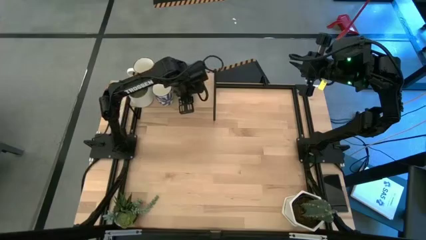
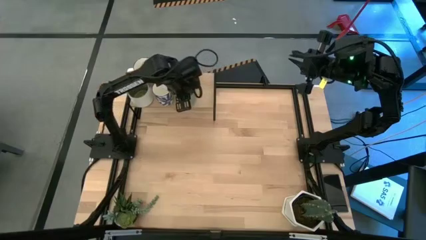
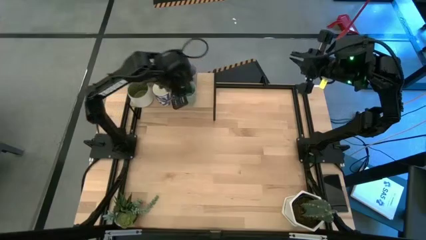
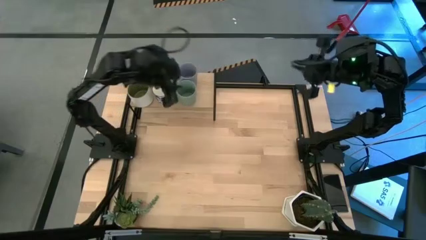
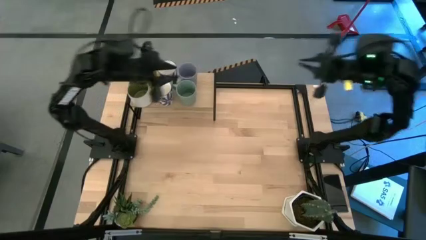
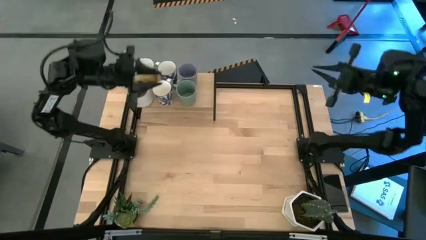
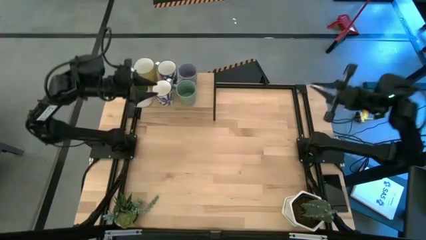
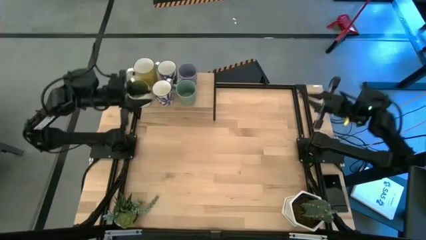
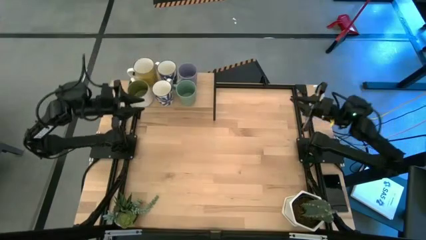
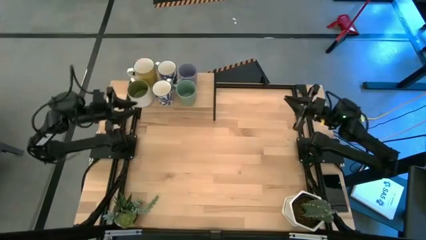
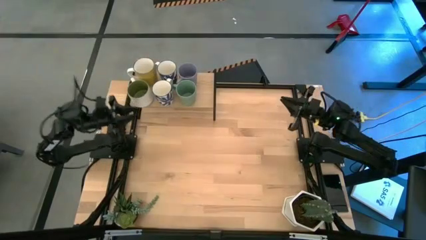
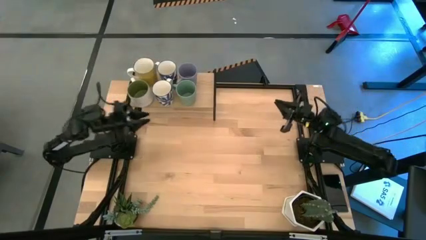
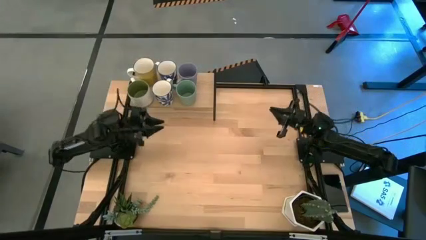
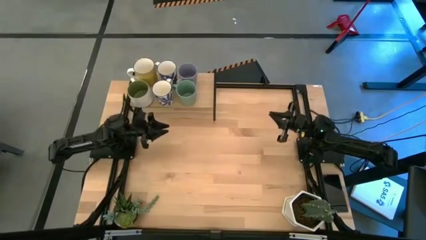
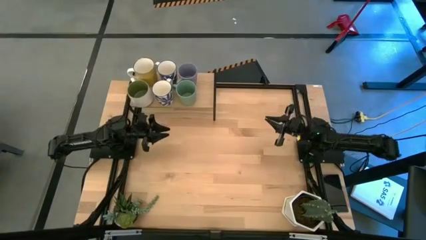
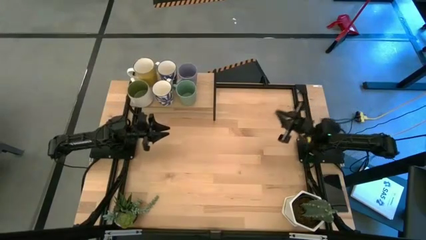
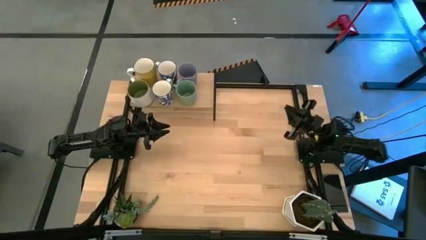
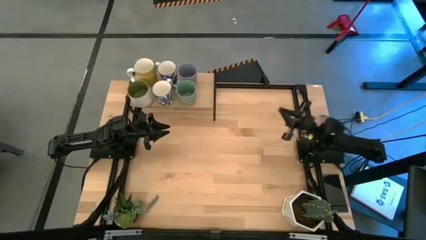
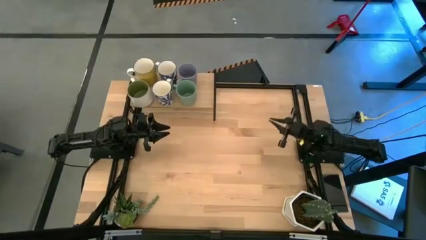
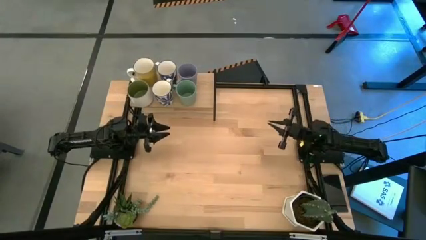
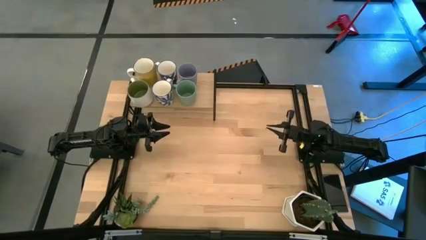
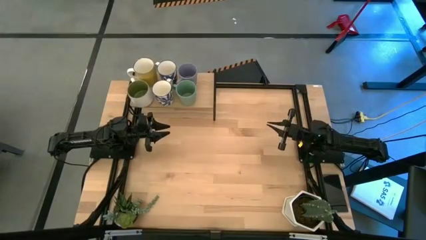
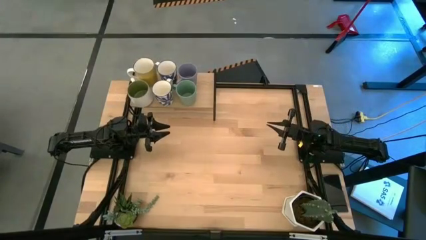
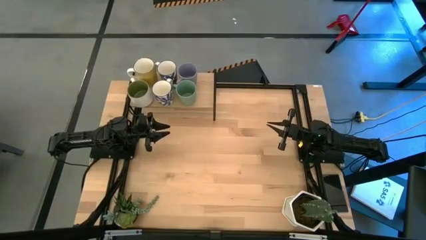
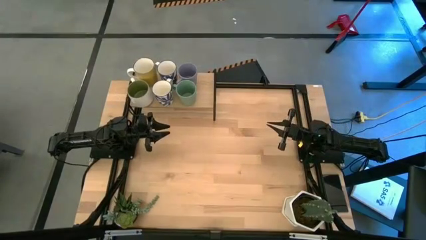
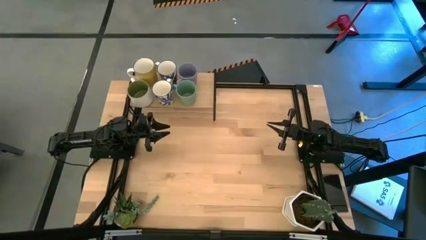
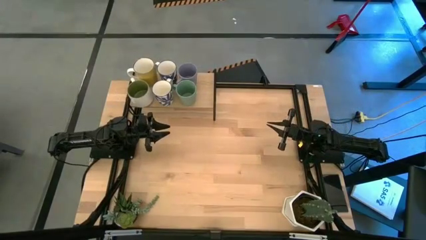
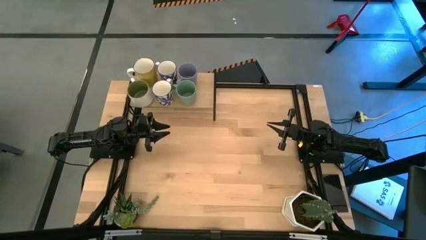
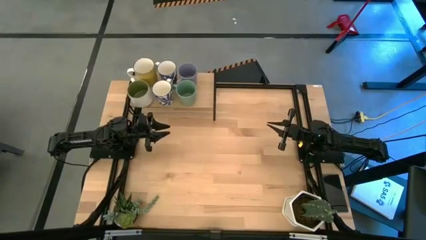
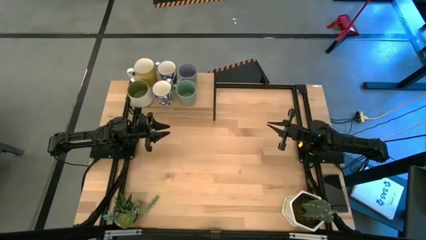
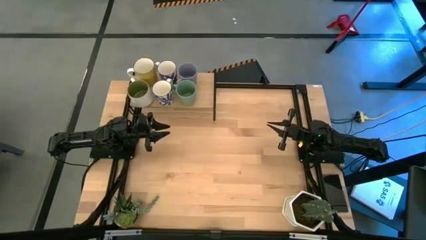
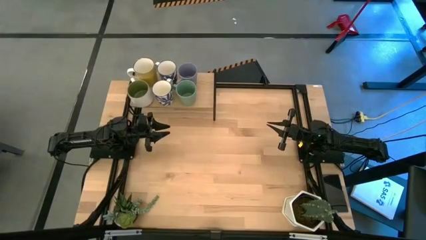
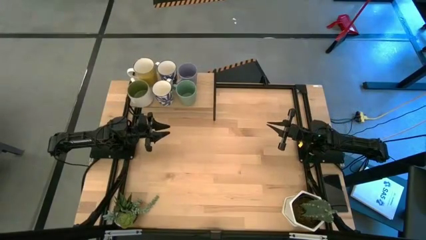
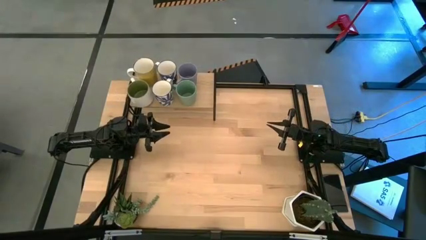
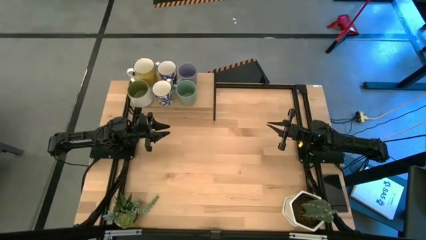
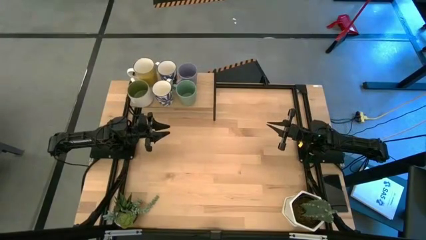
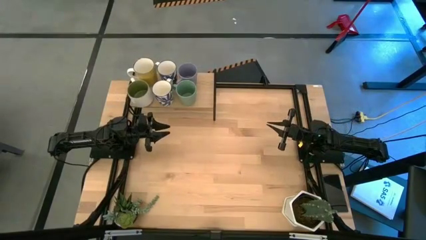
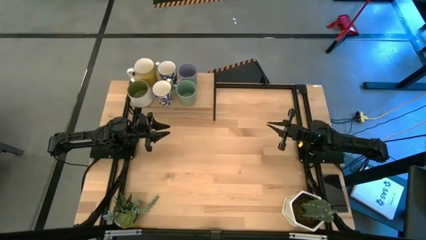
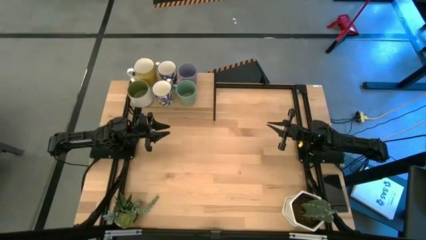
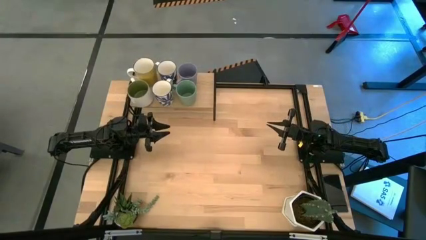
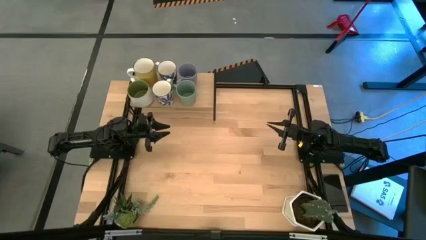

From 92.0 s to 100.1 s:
Task: Place coffee mugs
Return to Home Position

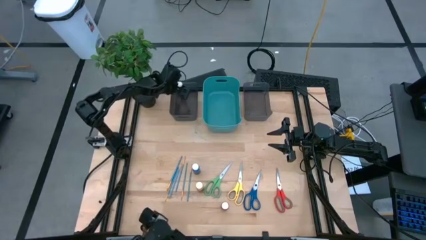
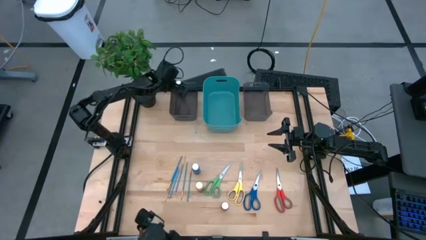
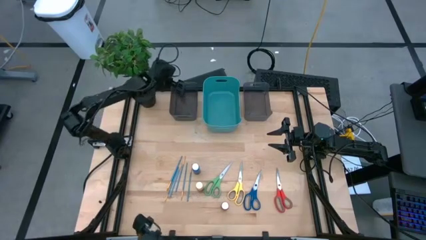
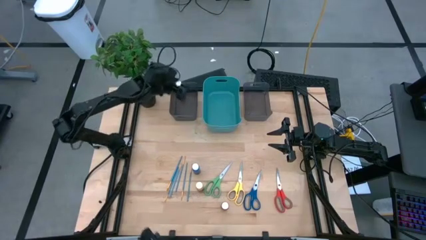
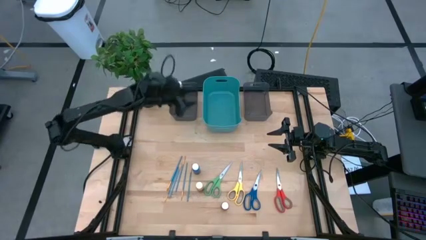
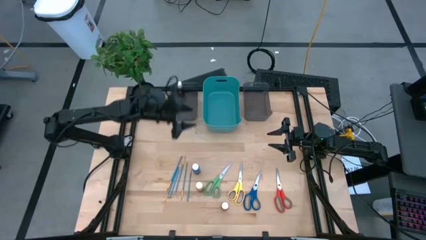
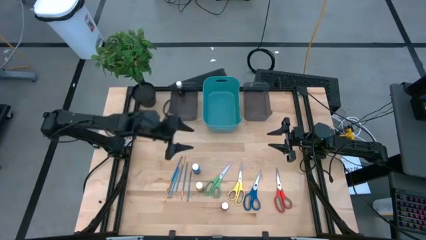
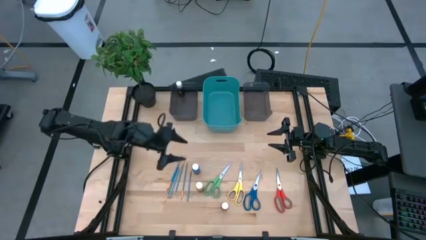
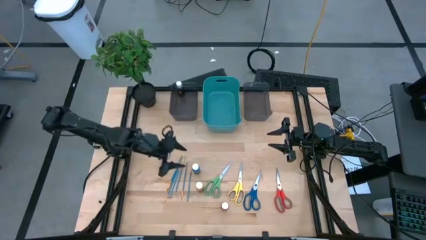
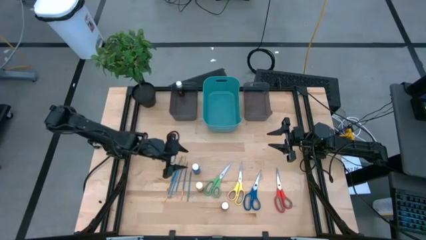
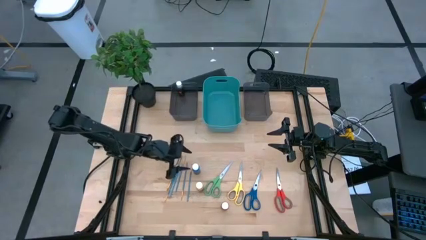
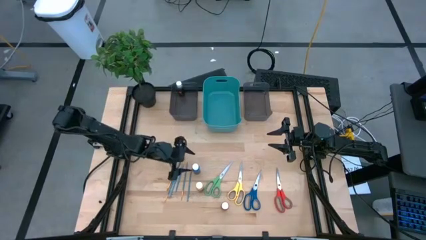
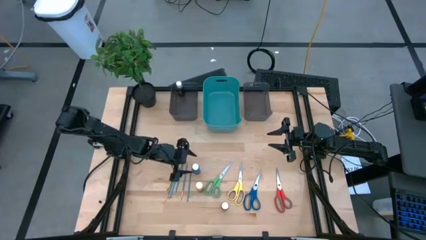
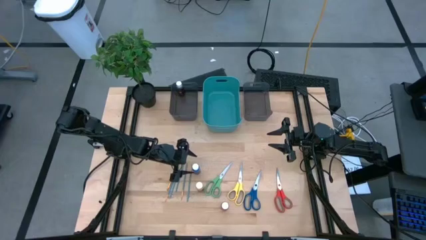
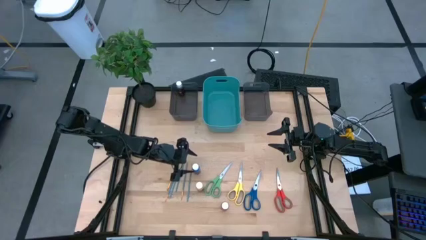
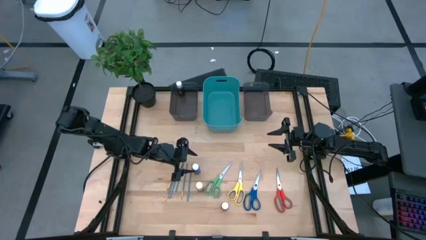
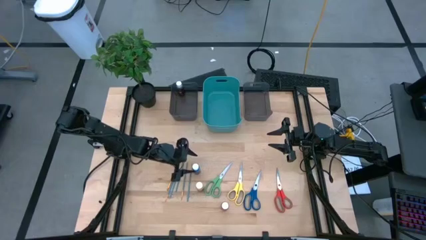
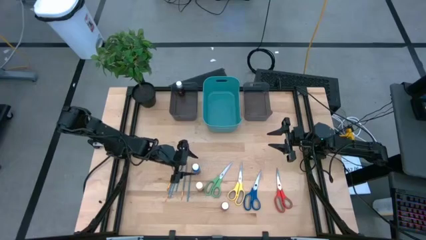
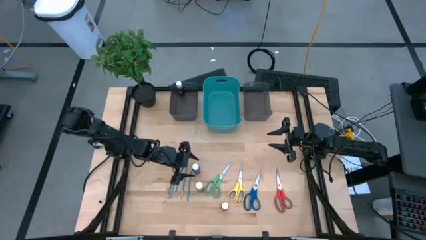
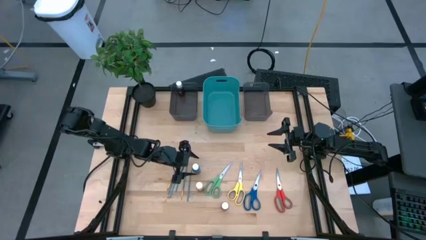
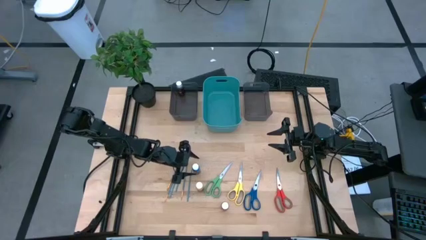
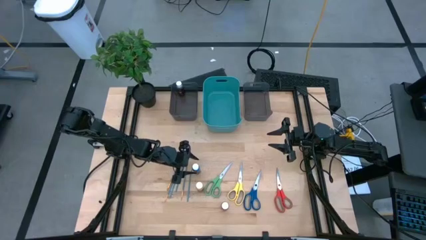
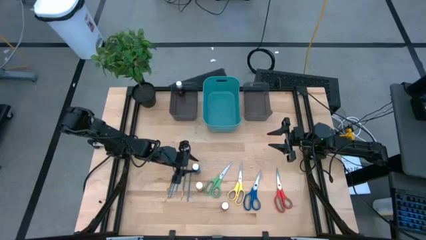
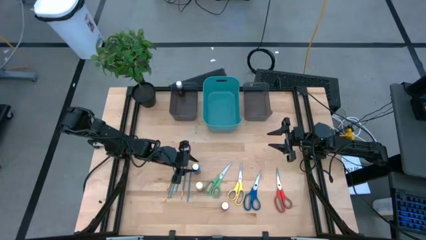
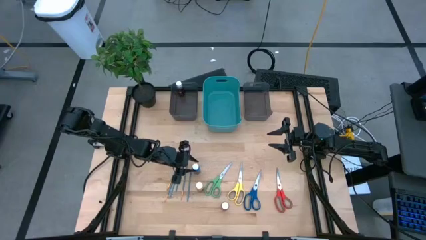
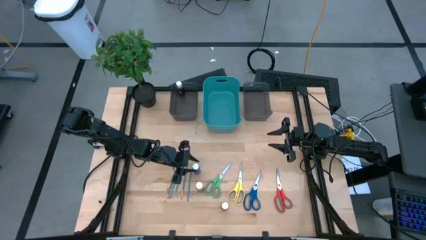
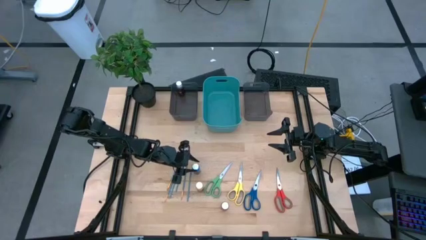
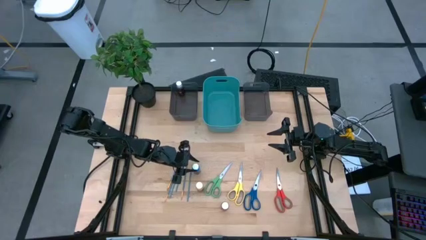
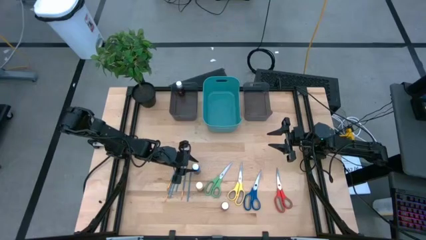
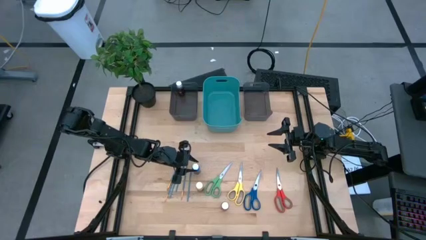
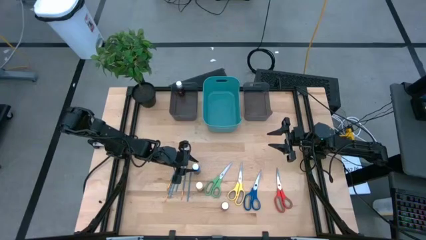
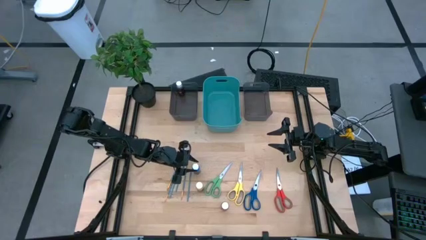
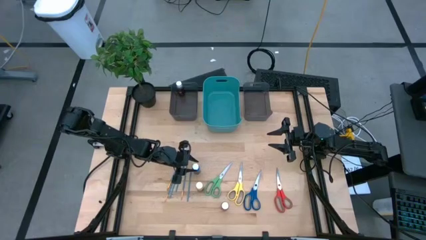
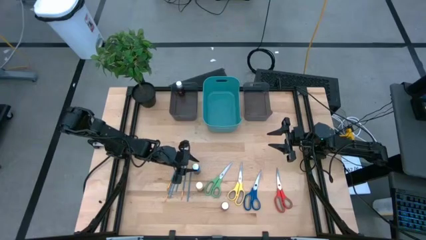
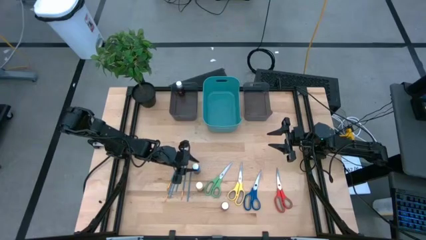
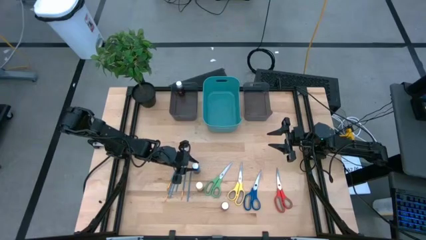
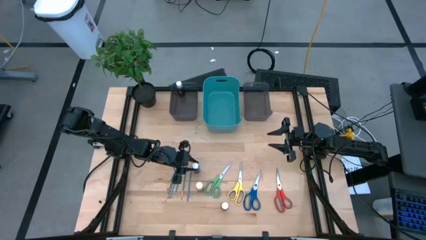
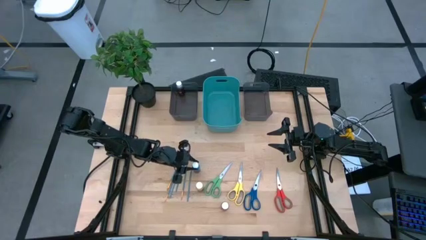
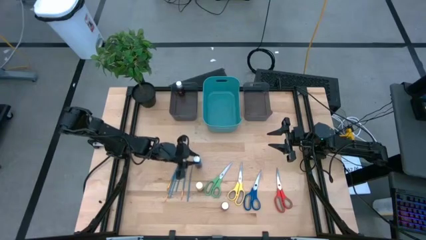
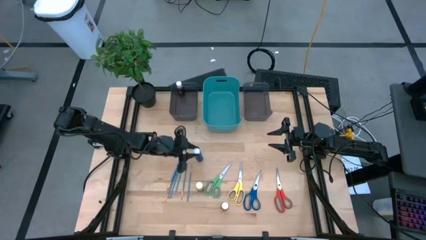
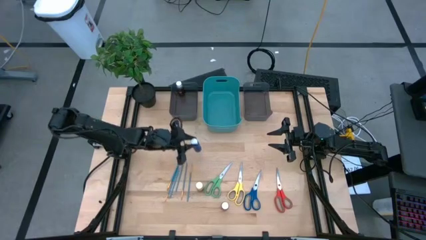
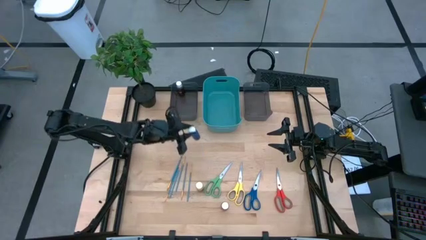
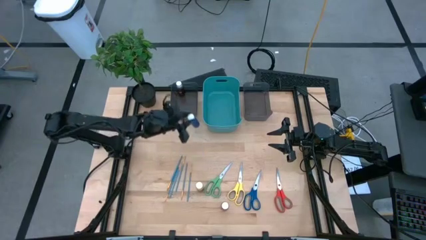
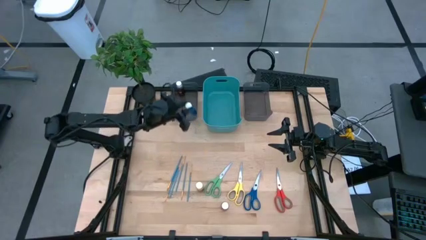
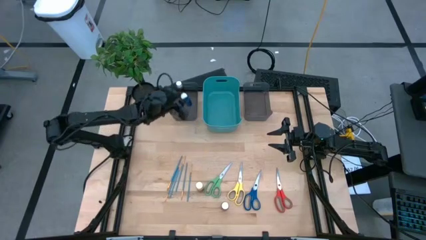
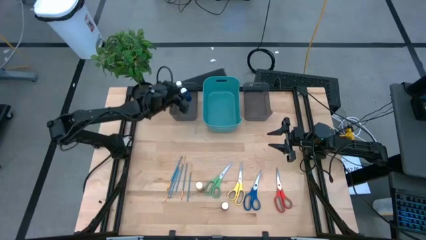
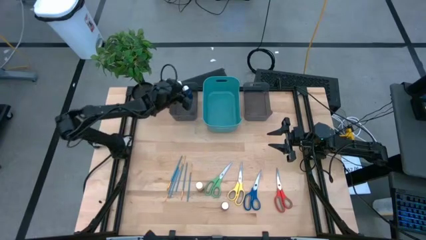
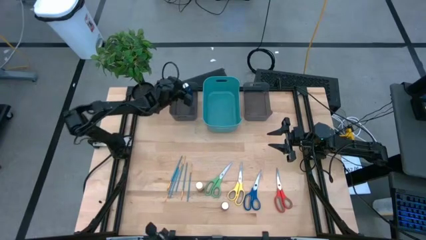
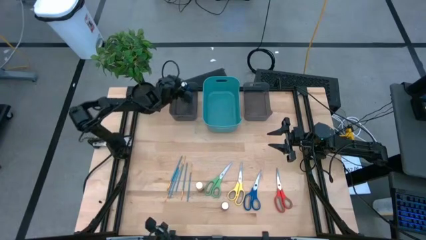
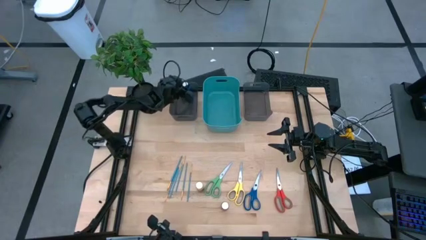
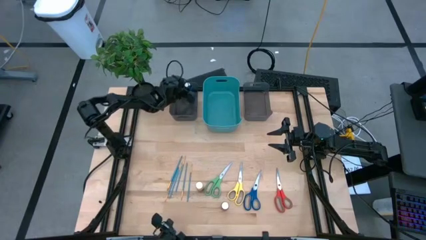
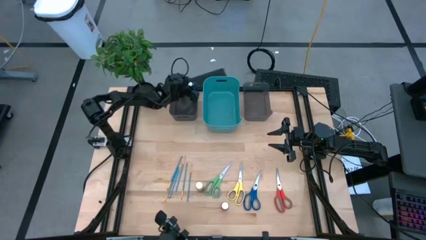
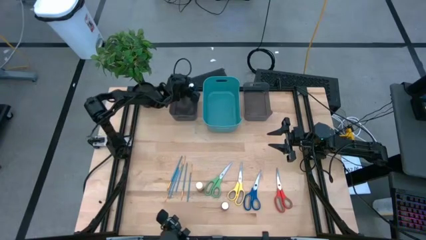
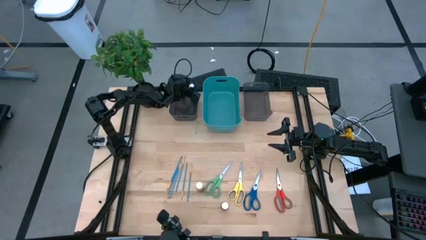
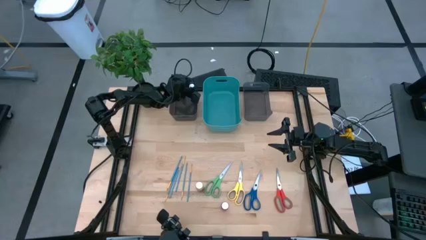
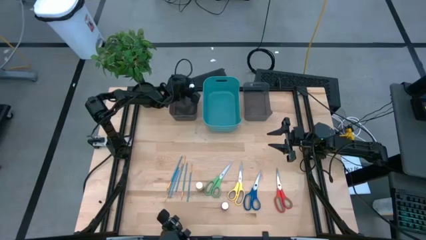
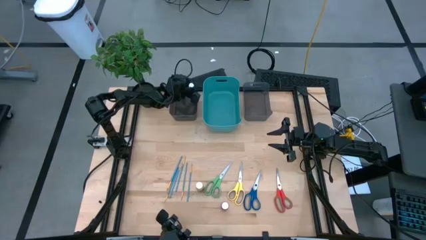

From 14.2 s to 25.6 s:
Task: Pick & Place Paint Supplies
Put the blue paint bottle into the left black bin
